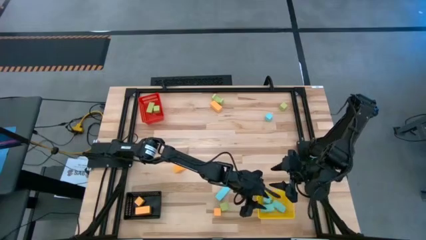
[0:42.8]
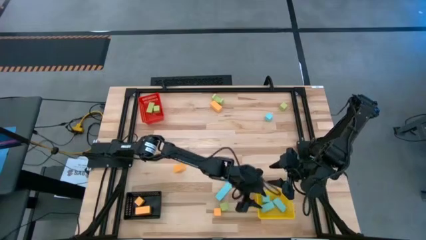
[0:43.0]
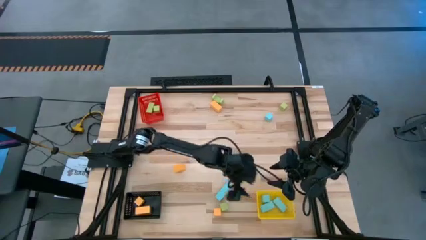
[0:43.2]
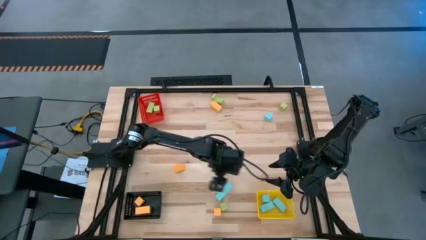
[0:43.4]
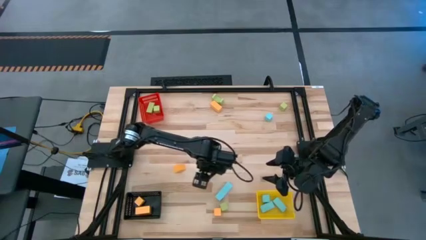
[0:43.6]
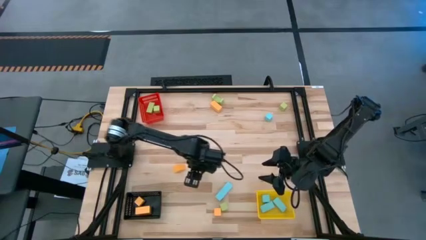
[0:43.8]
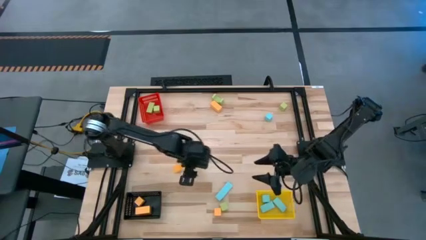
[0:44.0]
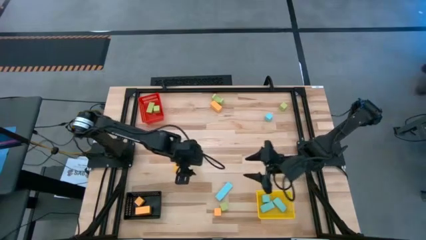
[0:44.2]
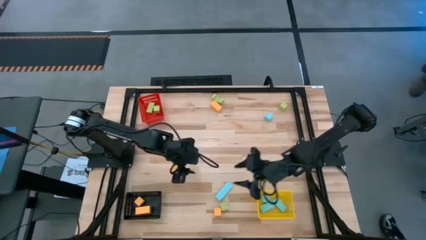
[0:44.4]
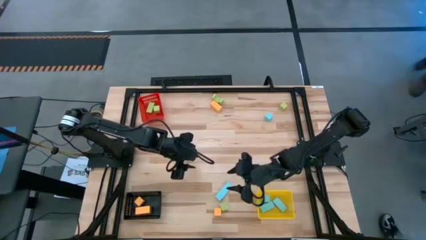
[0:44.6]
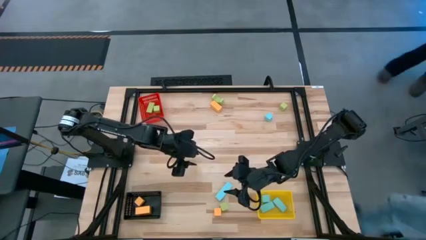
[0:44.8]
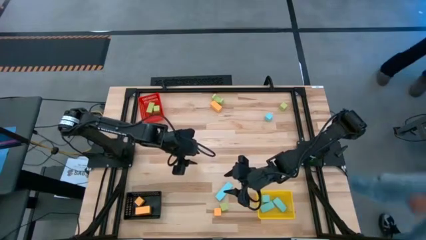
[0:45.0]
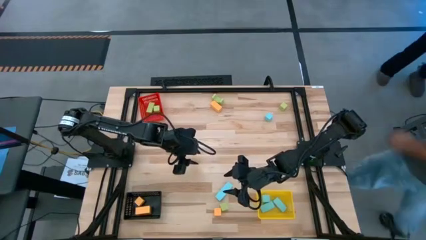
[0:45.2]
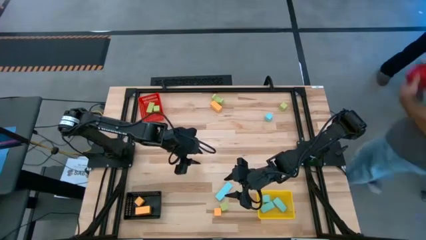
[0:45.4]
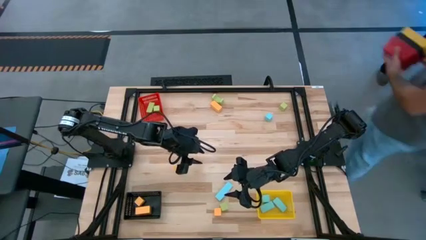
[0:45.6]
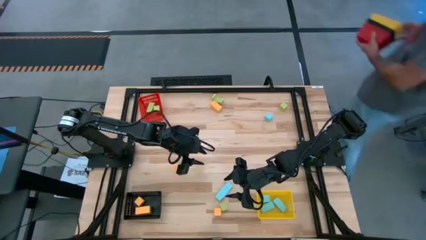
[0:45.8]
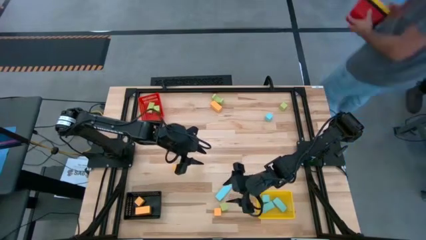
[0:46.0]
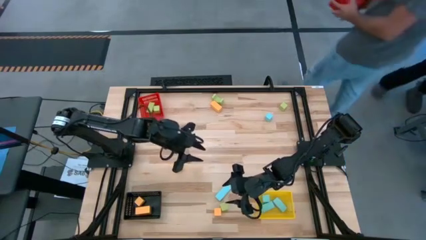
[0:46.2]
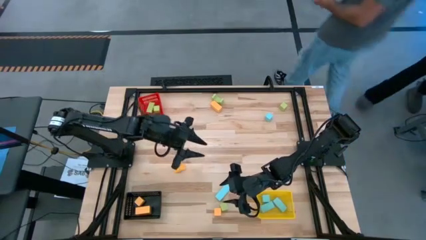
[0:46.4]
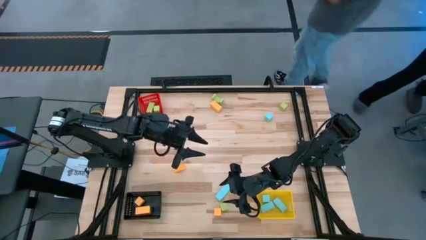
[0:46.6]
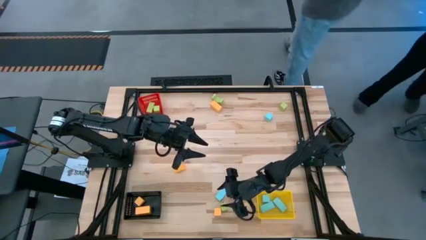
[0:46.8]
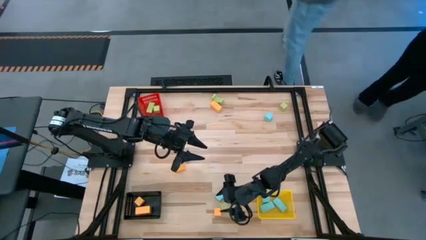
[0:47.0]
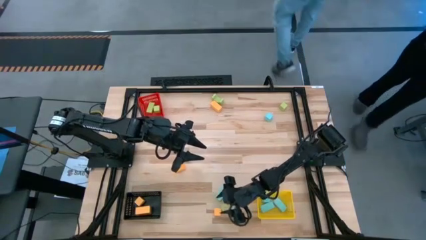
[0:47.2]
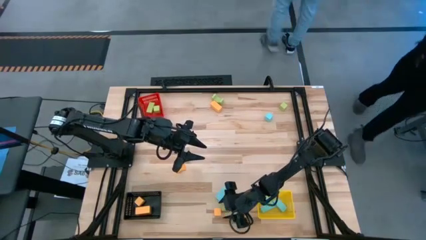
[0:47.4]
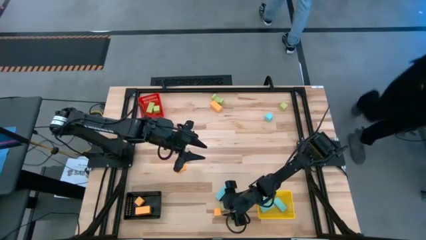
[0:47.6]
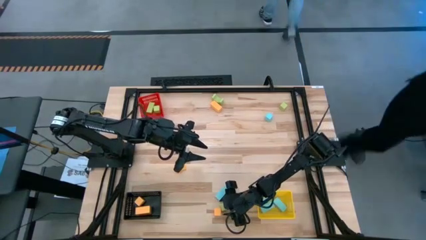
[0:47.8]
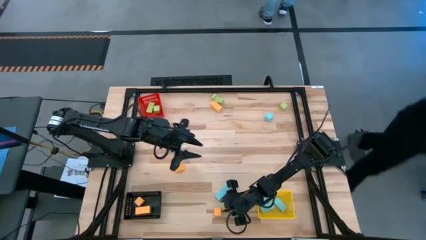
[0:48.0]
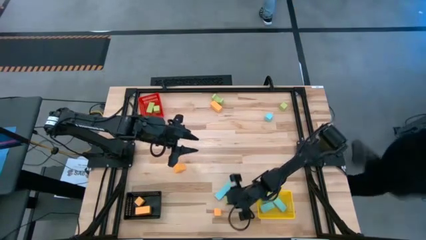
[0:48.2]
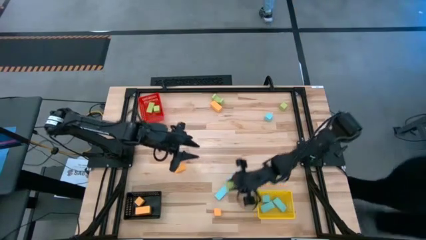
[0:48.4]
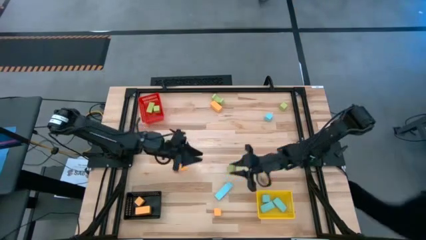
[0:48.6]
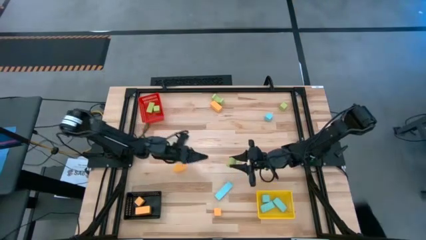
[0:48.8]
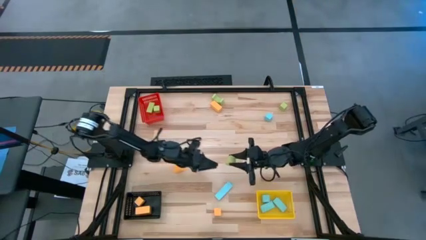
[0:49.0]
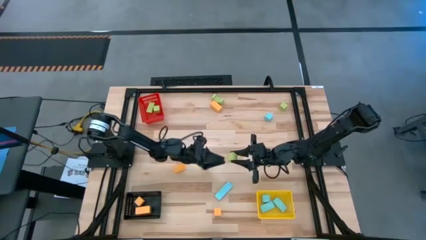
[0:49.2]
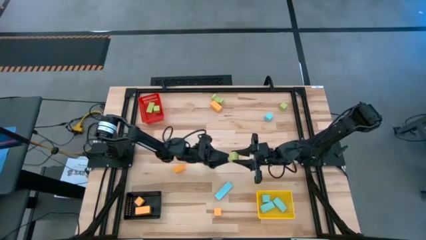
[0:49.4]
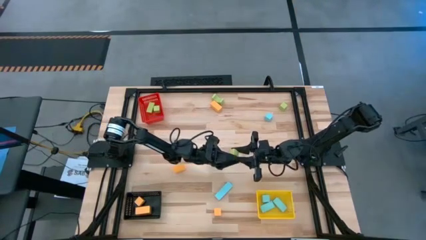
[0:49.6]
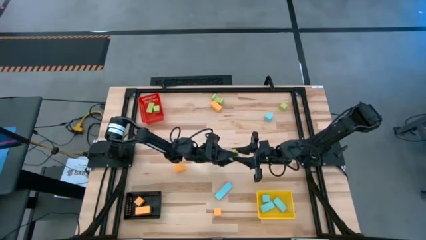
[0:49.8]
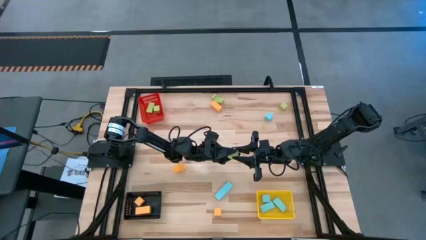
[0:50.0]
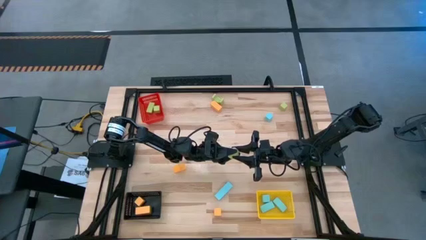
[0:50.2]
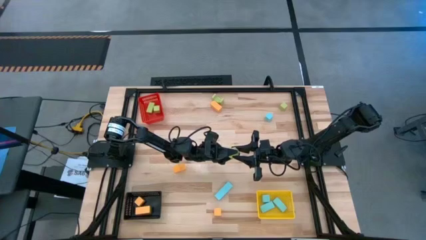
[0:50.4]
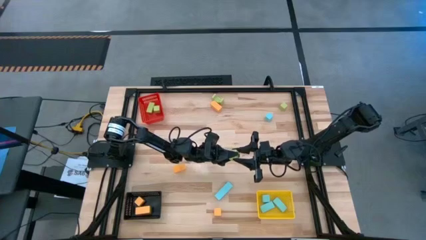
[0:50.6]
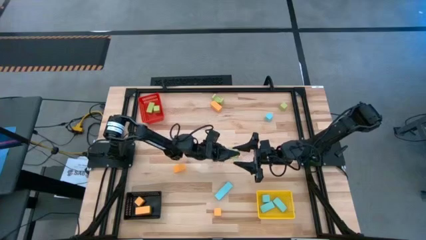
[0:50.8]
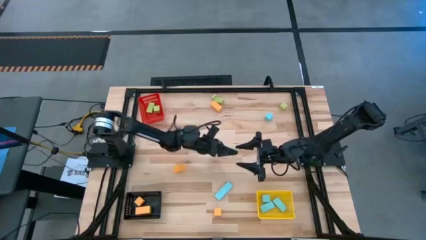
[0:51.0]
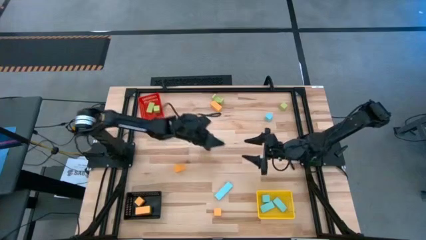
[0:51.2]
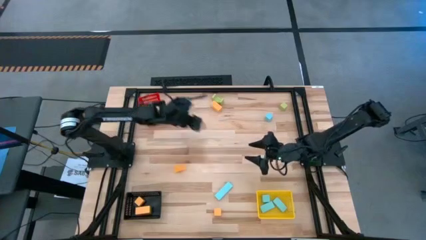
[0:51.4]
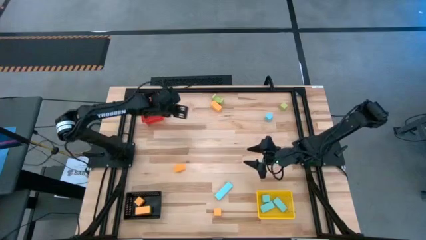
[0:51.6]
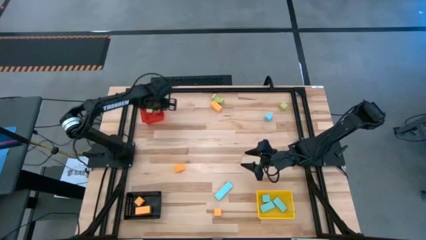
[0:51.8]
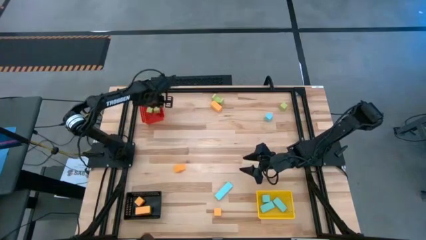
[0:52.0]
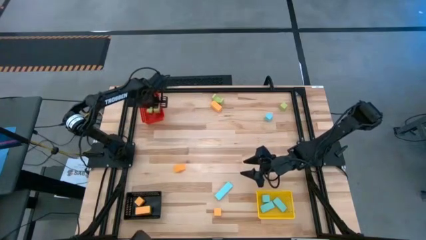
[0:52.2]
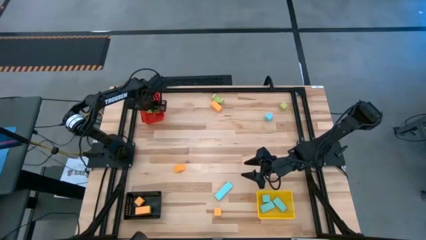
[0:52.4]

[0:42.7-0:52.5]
Task: Sort & place blocks by color
Put the green block into the red bin

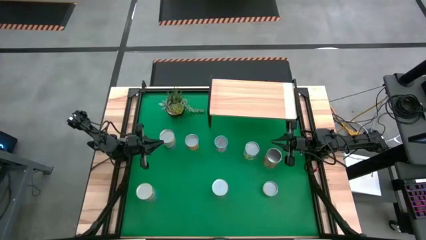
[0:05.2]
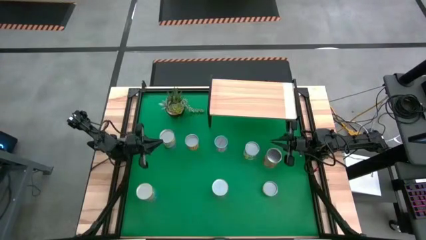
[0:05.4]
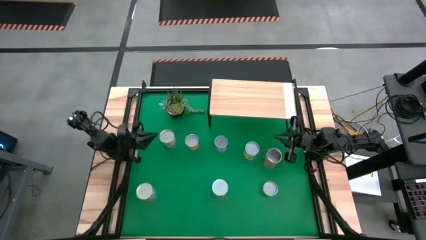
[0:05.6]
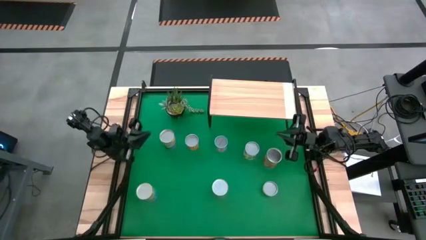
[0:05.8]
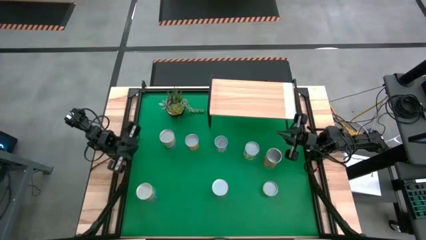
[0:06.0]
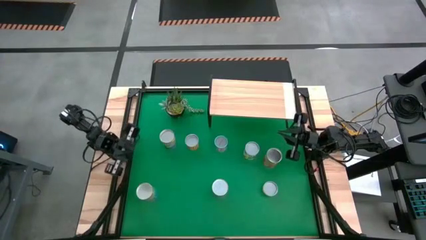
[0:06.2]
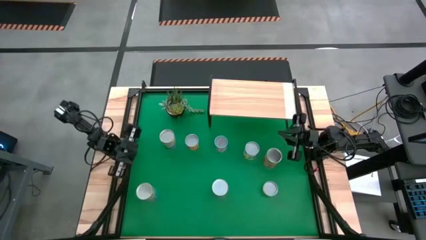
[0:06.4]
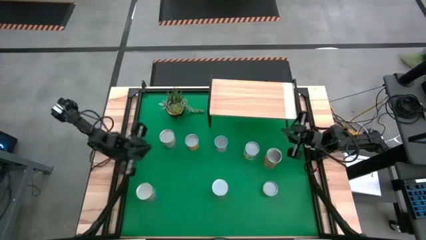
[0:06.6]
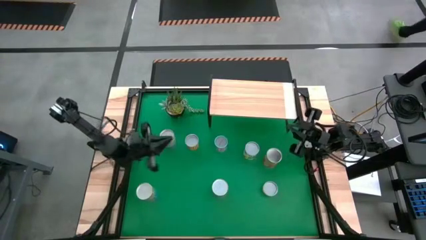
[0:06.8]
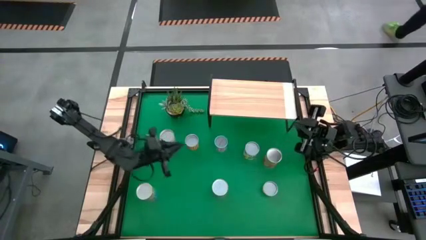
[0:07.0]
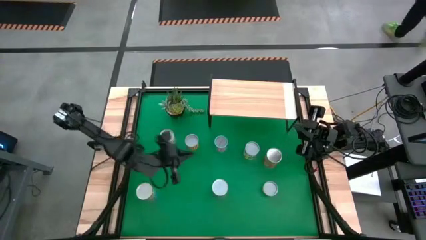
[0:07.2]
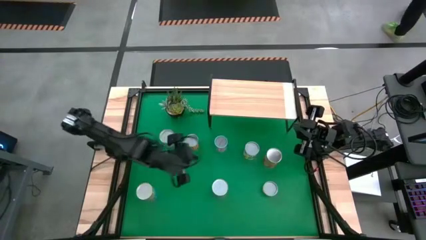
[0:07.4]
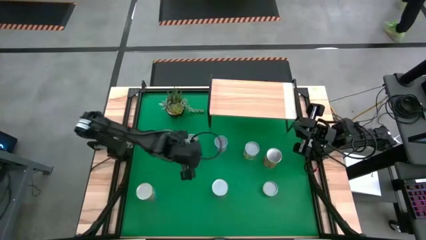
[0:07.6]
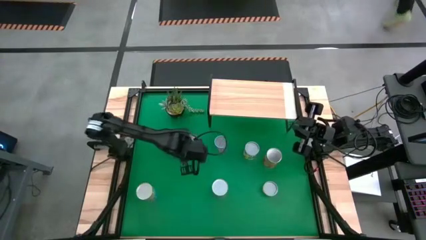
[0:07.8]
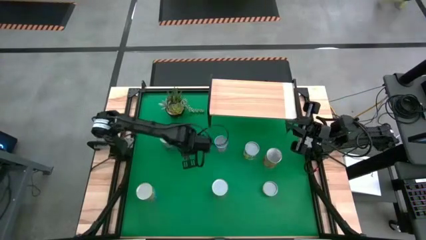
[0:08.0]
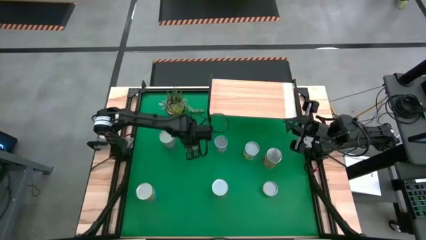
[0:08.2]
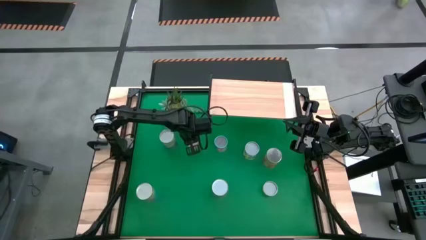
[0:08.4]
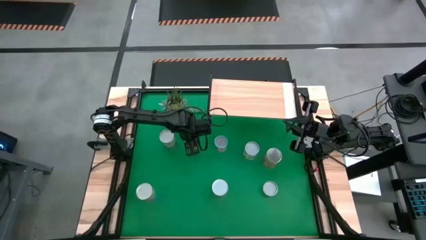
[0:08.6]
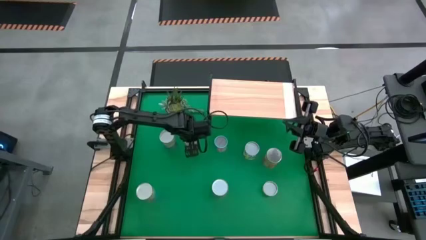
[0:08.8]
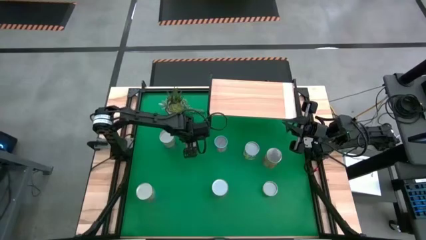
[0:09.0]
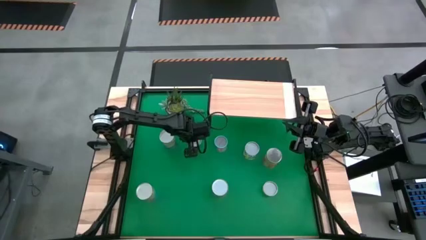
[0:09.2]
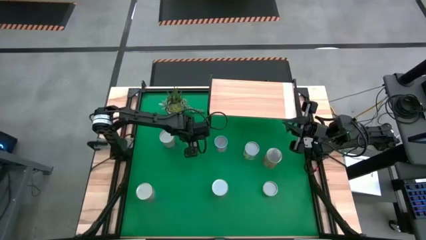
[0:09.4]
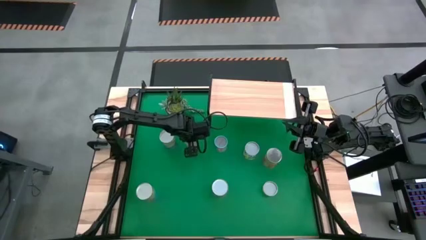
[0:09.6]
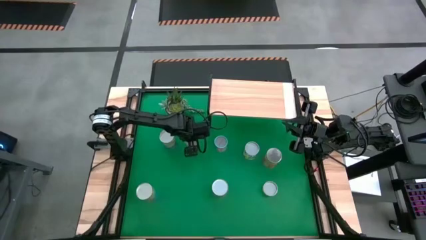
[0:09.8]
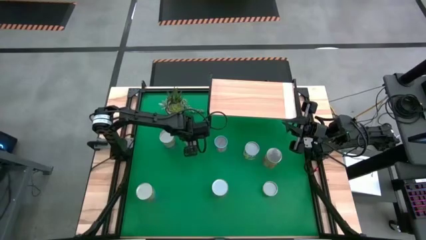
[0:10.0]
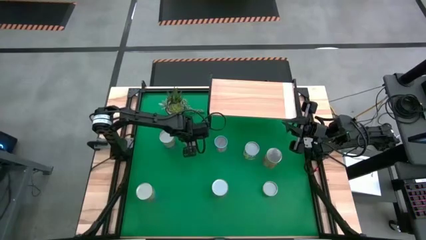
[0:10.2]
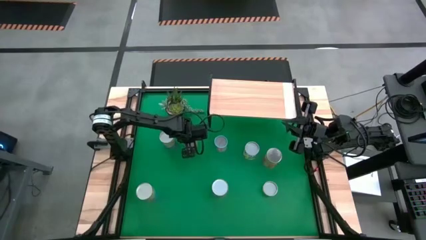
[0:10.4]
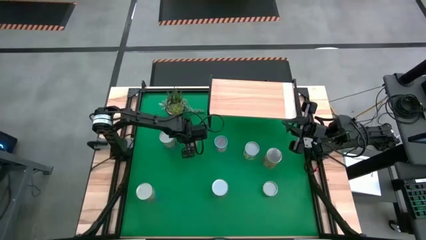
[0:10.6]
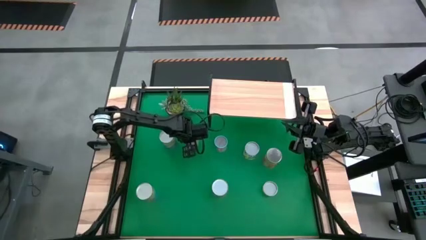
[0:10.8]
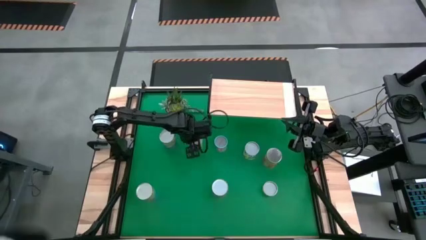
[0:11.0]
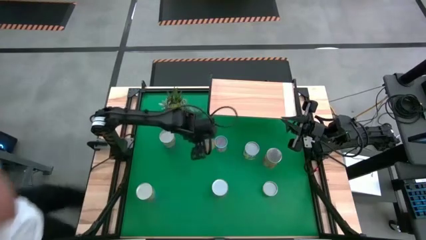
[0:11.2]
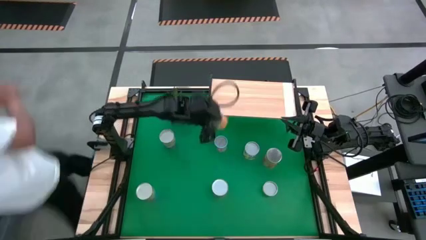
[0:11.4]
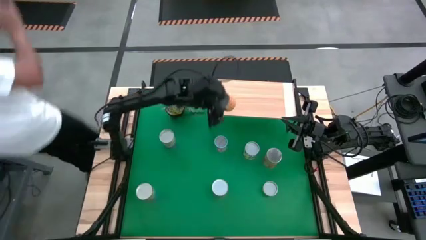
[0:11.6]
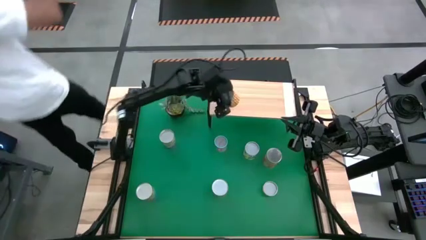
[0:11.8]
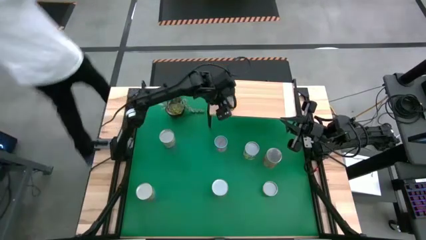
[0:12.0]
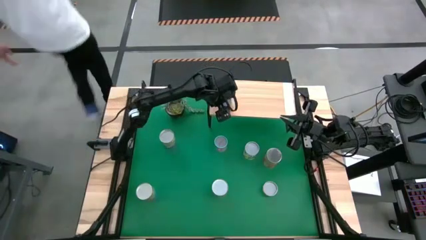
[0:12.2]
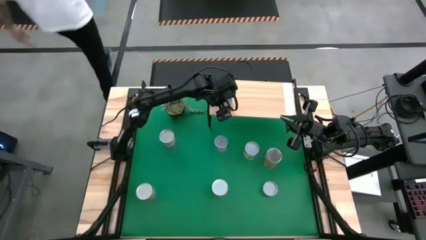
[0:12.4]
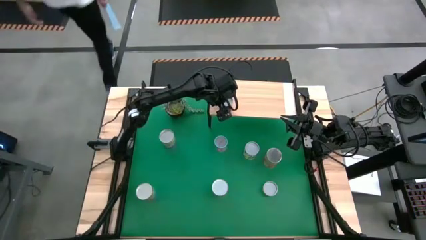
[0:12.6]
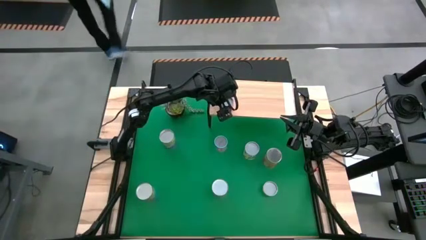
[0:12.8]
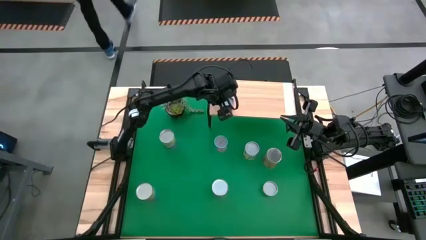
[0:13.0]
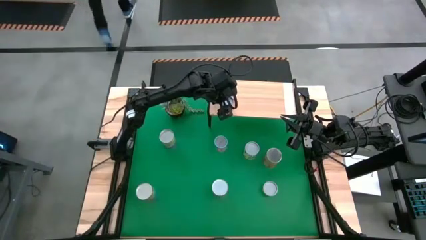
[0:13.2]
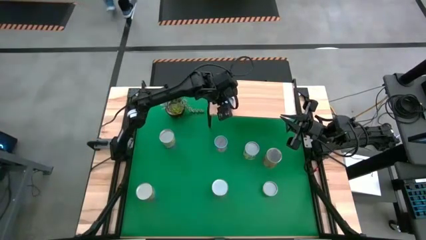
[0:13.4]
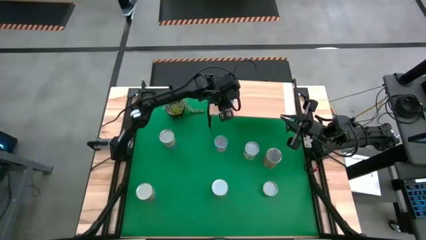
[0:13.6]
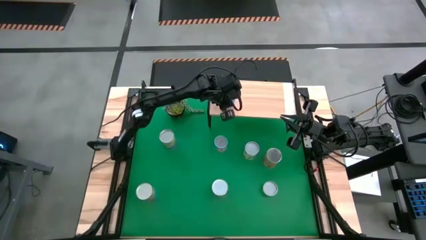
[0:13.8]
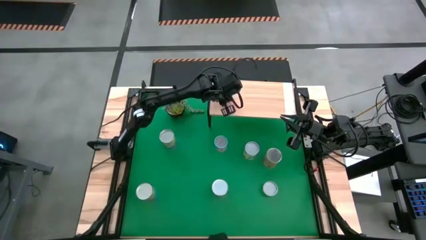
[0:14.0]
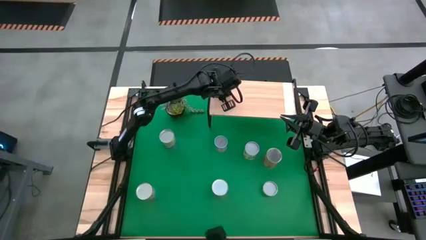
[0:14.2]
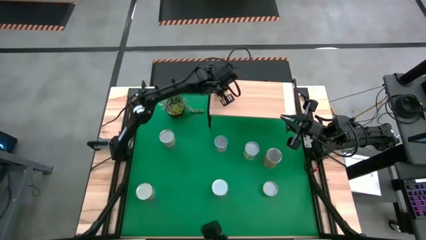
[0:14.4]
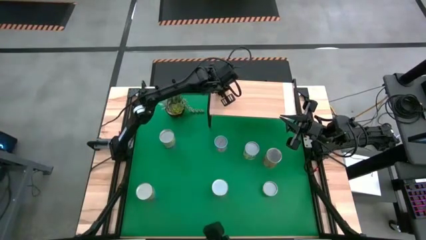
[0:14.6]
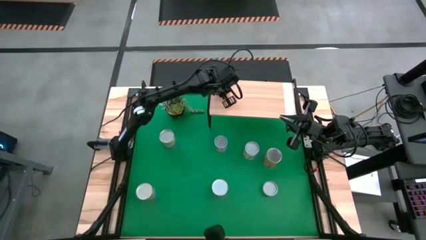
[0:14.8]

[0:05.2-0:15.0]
Task: Pick and place cans onto a shelf
Put the canned black beans on the shelf
